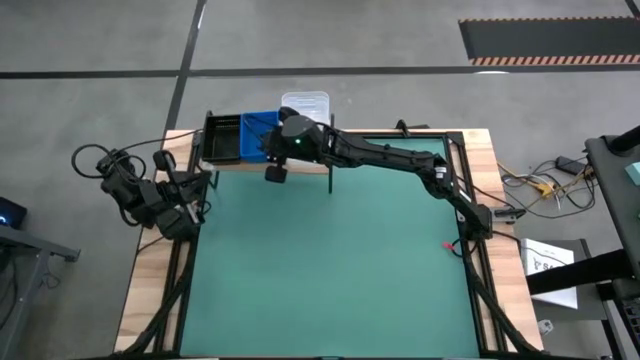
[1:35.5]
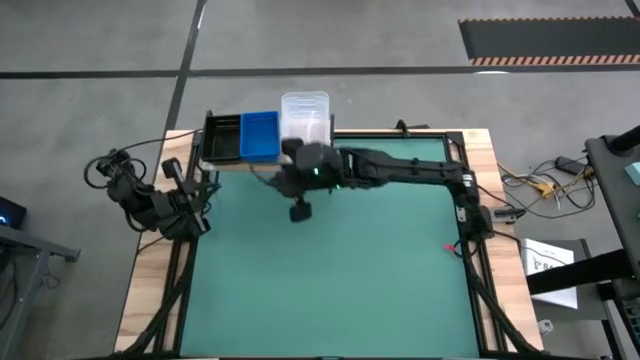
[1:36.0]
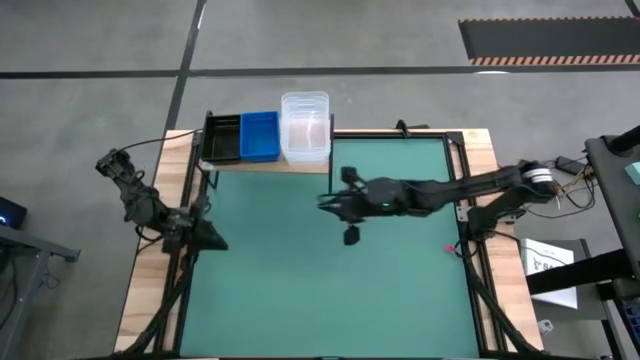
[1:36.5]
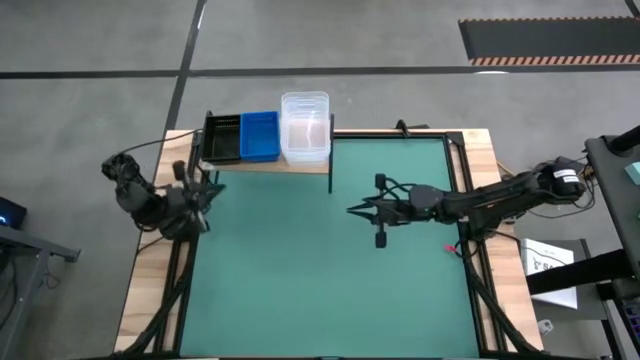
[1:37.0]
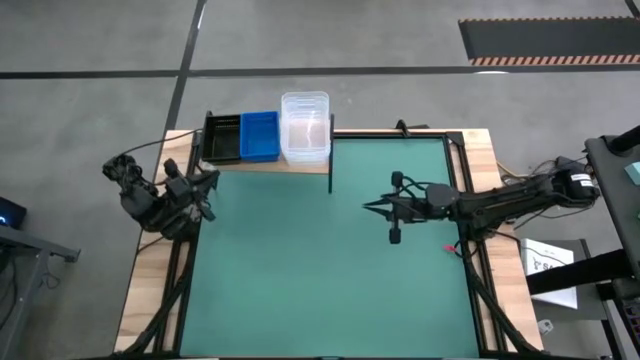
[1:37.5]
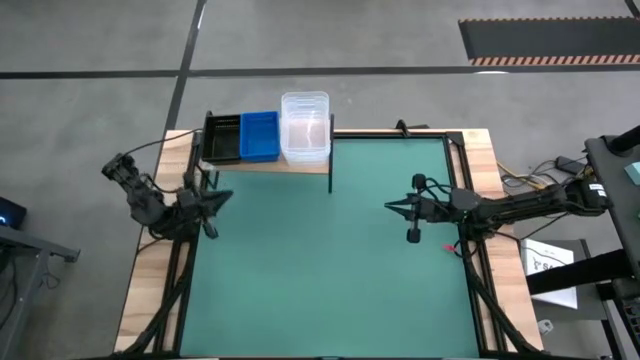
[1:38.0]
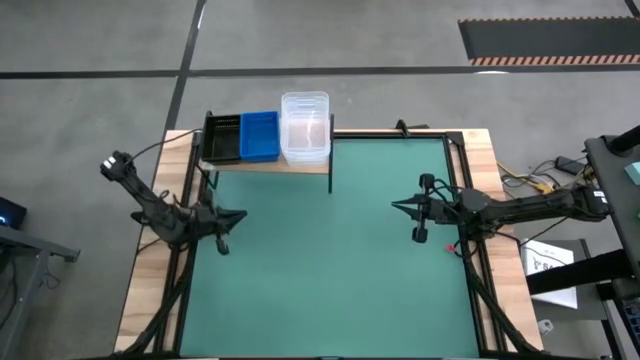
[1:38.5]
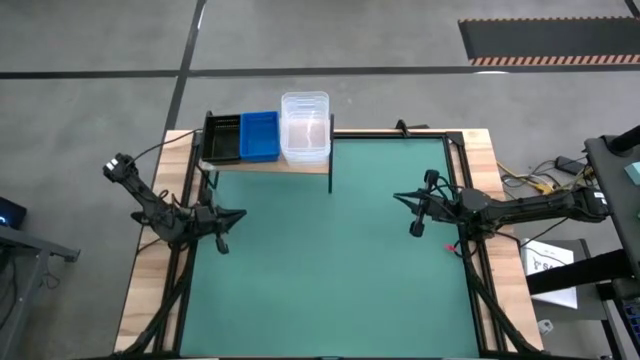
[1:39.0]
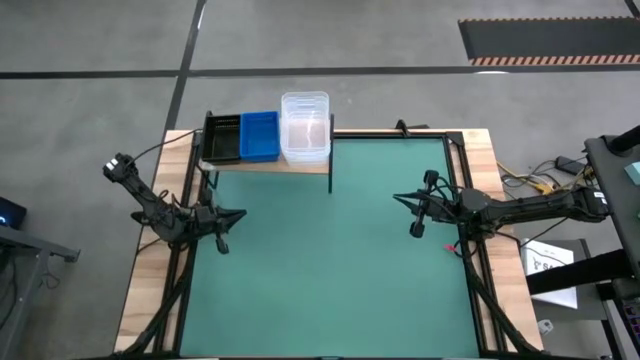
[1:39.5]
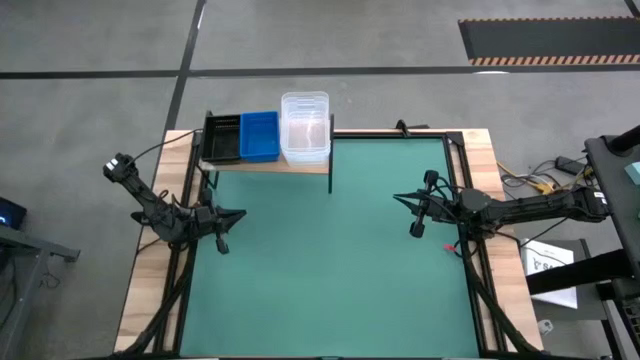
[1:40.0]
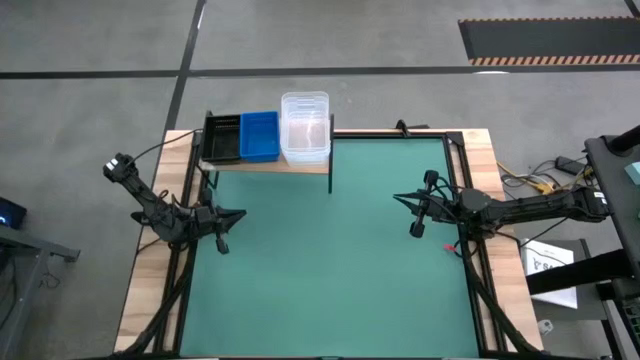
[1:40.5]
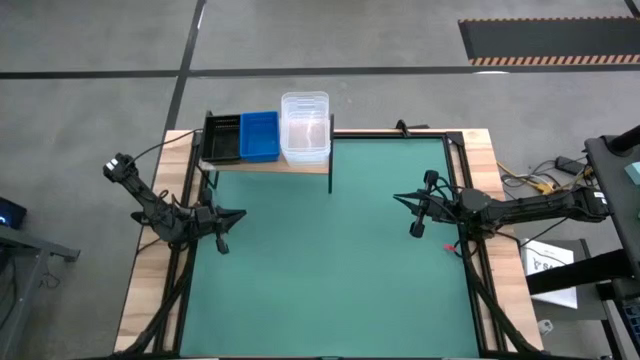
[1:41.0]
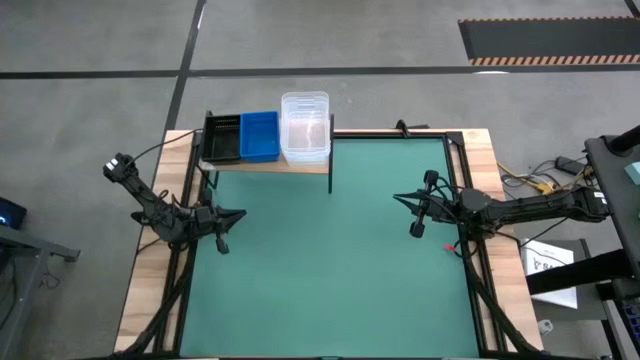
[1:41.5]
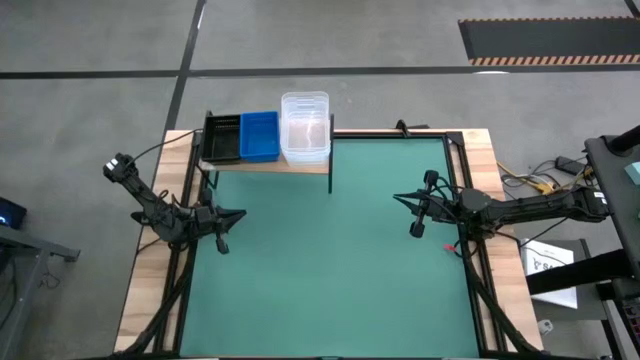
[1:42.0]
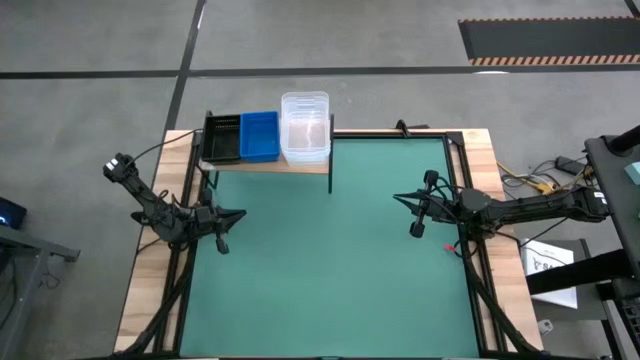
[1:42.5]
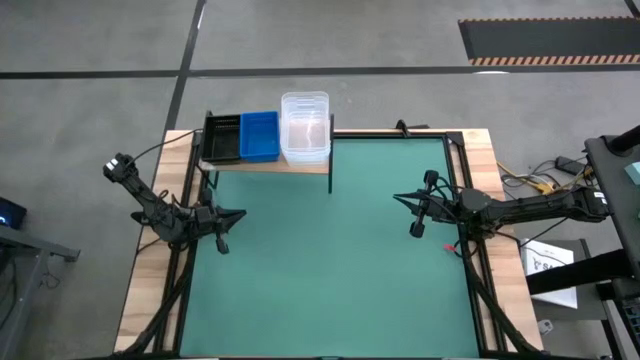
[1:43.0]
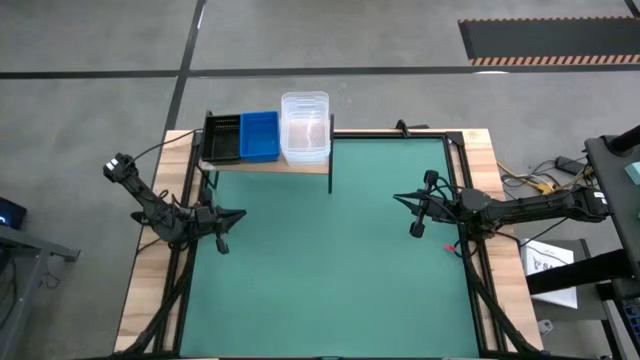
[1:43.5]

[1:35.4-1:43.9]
Task: Stack baskets on shelf by color
Return to Home Position
